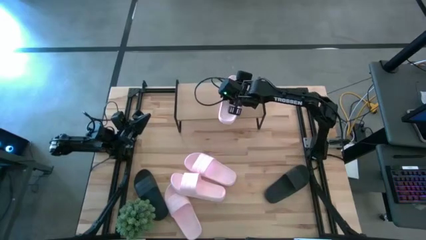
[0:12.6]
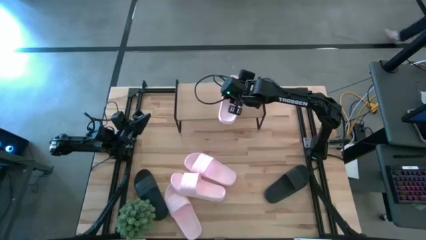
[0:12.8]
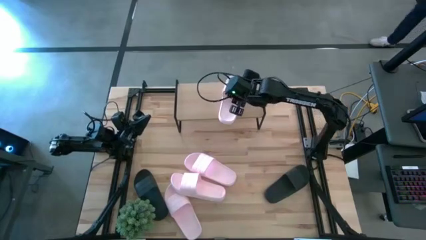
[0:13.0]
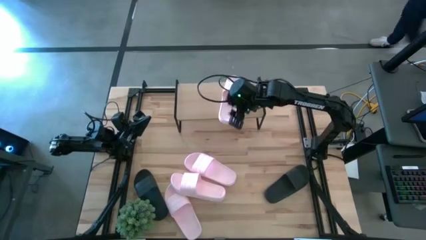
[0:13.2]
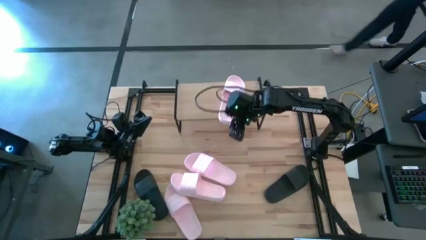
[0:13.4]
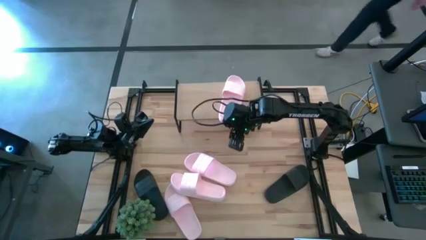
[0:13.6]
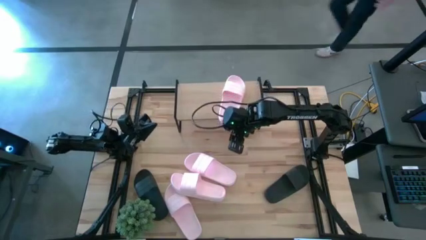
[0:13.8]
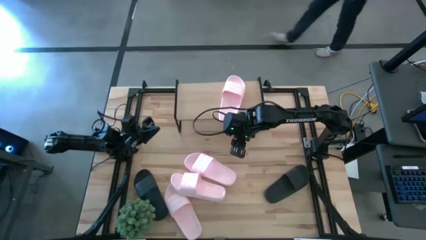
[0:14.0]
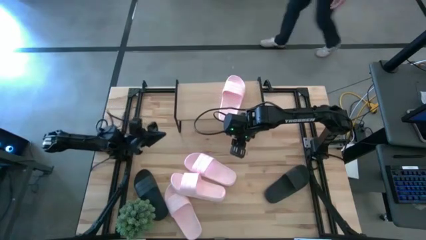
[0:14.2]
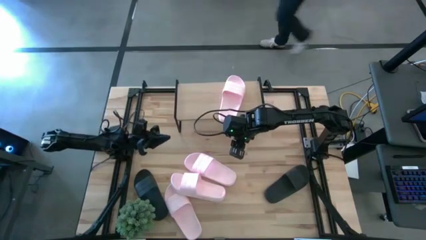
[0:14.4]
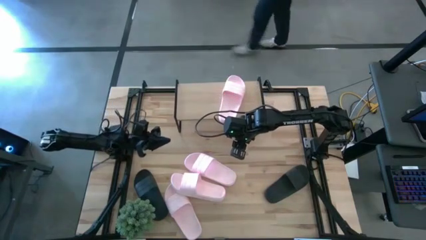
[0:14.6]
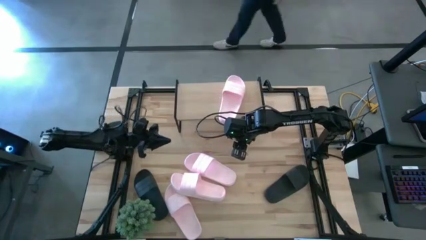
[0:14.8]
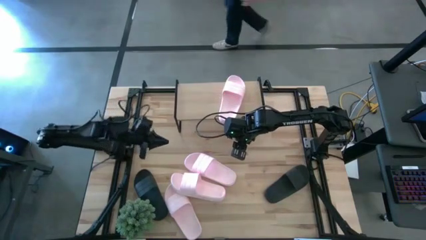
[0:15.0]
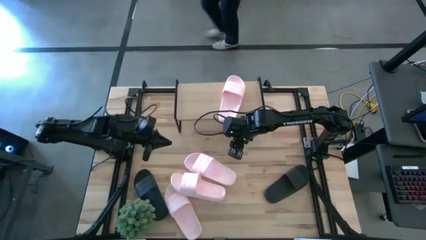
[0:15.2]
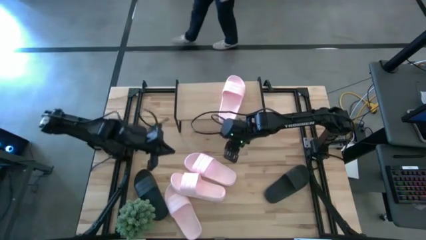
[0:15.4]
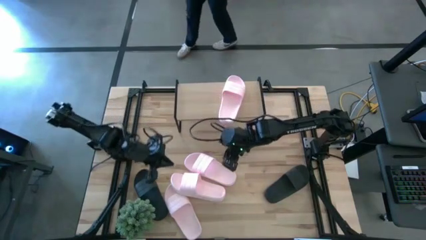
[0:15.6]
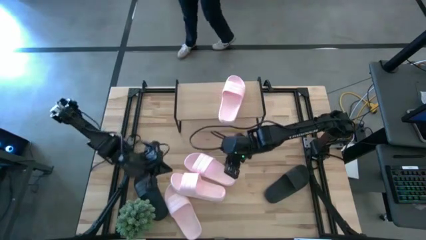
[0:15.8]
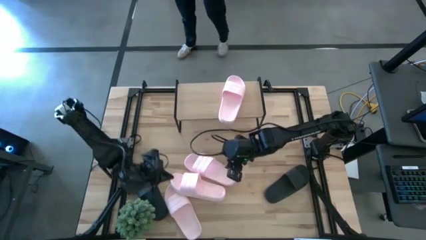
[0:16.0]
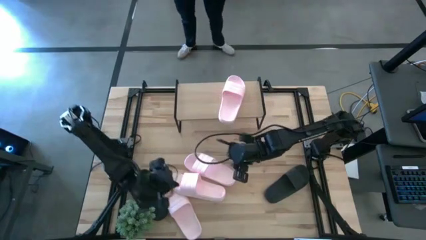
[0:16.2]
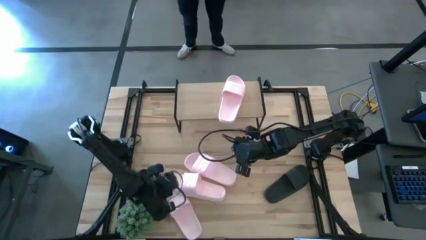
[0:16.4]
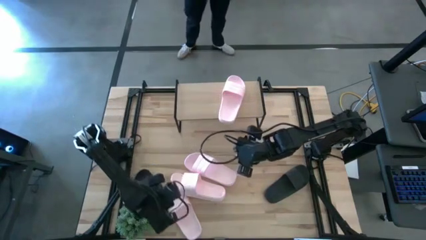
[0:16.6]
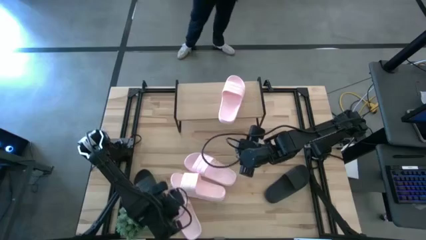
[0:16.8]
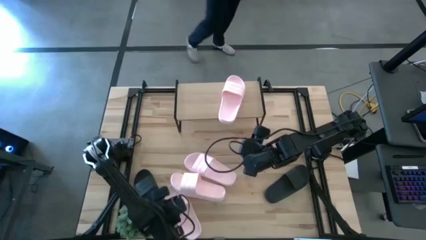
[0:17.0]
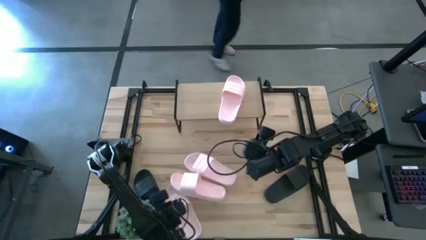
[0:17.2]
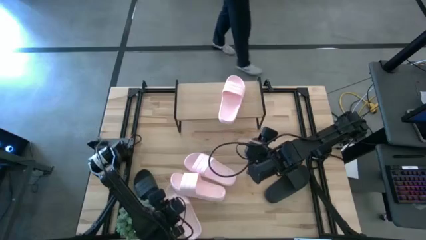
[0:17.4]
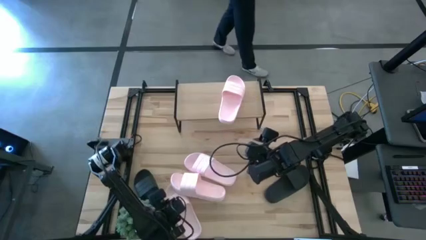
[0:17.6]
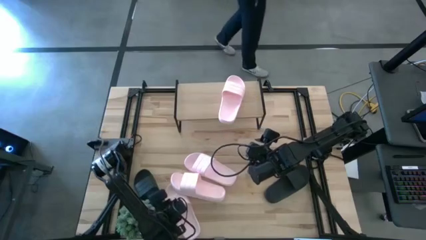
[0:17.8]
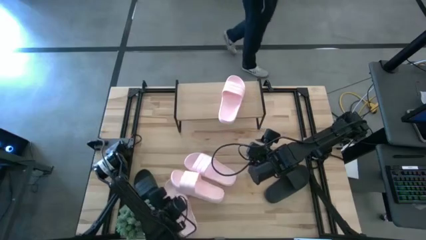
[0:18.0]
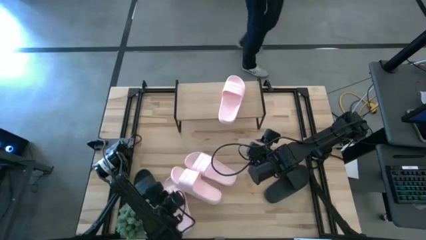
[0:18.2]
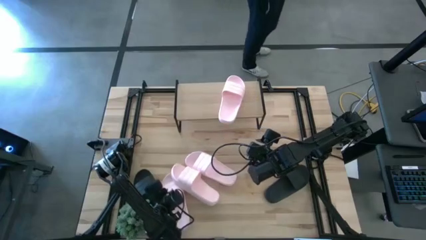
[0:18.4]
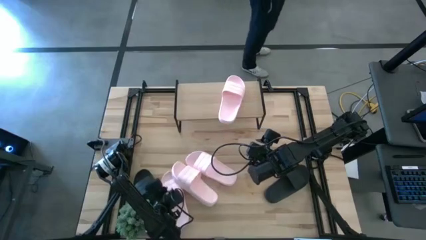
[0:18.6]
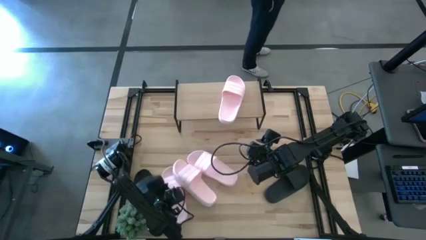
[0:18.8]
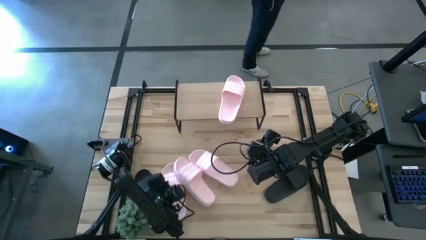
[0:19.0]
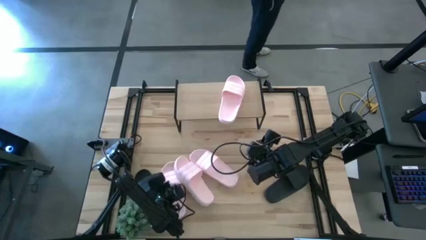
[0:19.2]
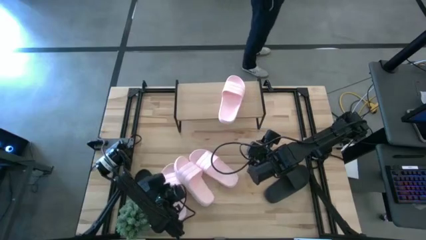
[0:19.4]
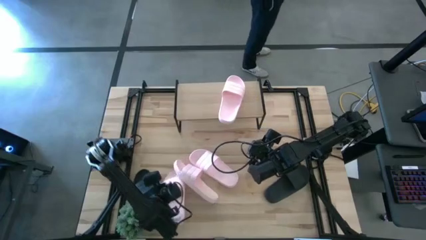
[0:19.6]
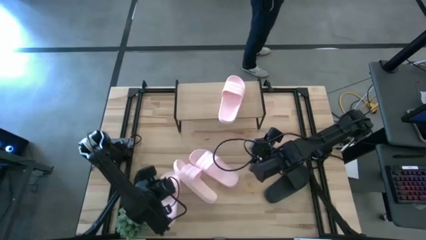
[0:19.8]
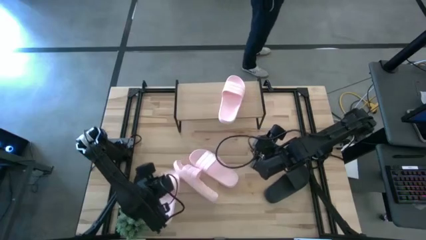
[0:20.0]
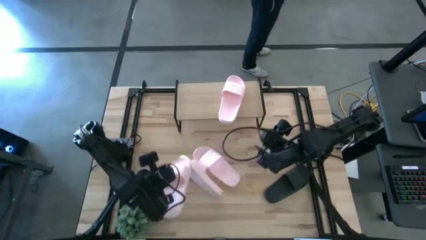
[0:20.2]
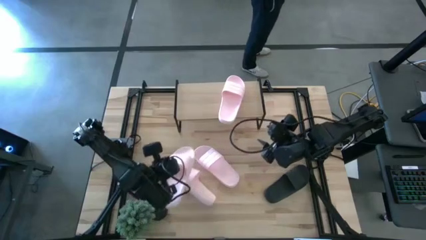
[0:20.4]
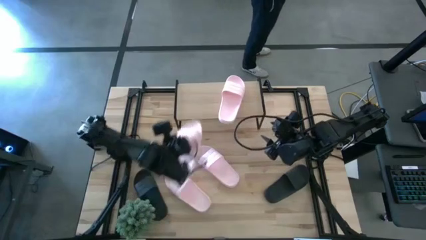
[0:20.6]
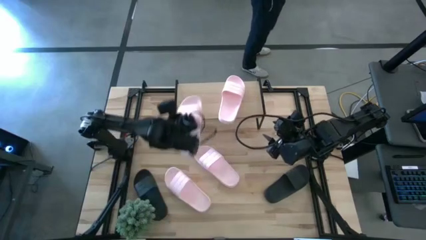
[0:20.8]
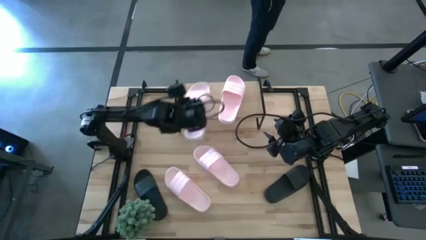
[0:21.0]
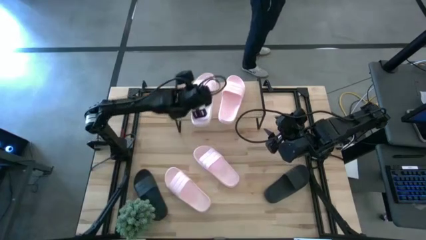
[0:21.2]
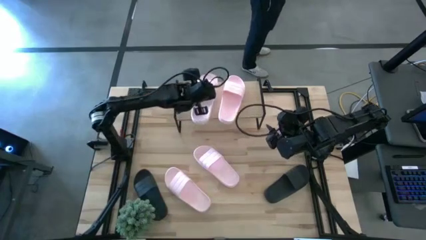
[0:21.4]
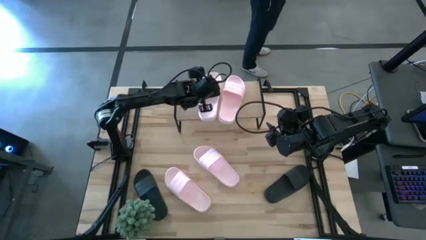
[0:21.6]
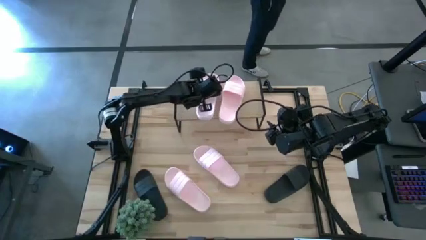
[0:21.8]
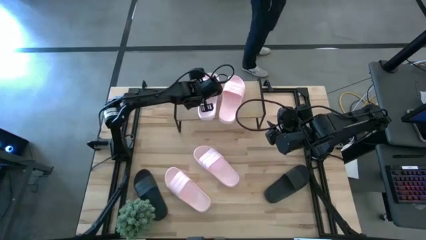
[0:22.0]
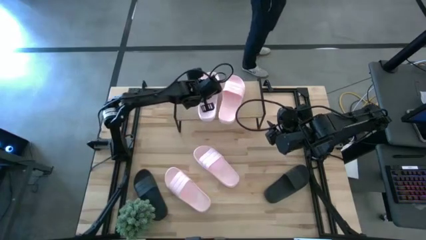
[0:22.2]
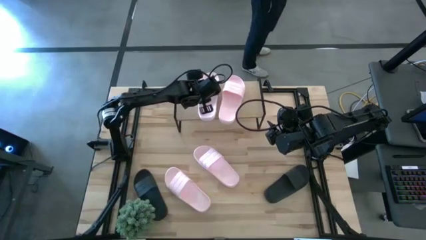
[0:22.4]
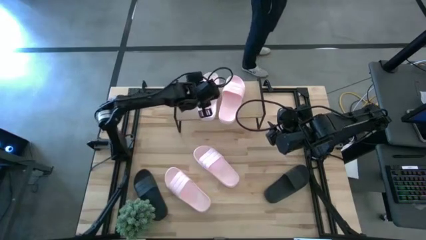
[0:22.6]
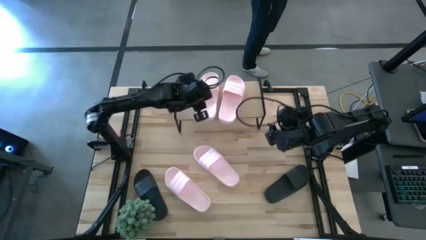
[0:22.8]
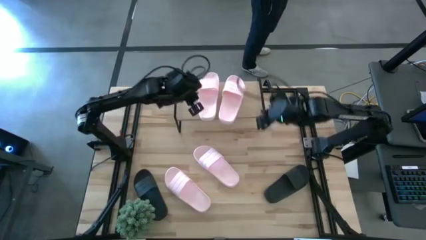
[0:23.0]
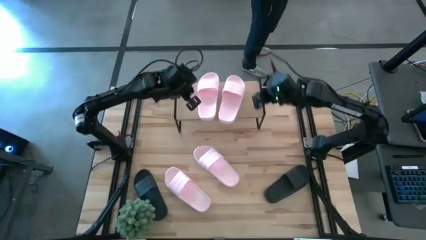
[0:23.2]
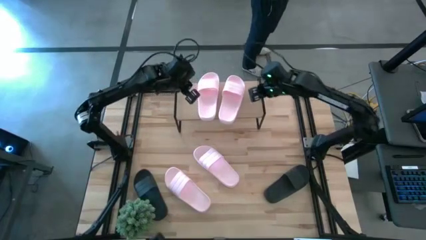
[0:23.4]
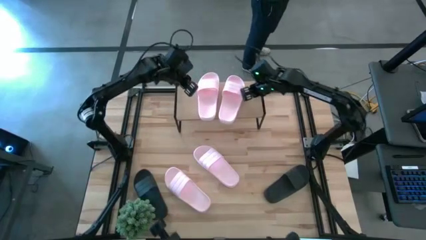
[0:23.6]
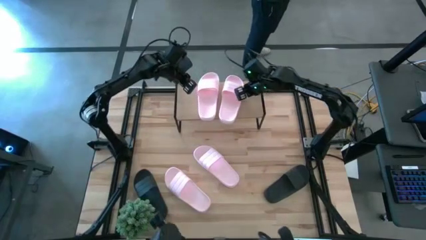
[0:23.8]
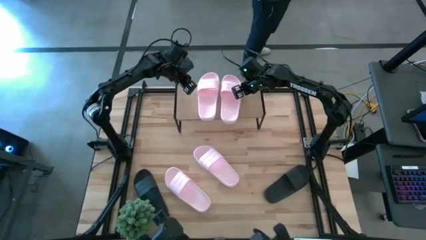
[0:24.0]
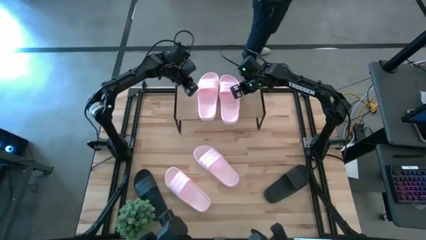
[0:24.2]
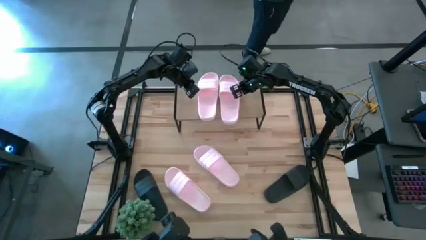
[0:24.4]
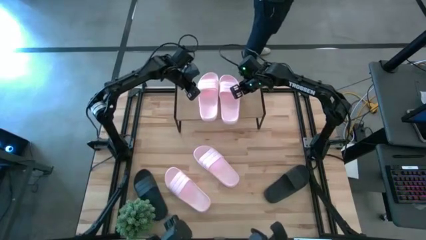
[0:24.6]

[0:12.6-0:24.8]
Task: Pick and place slides into the shelf
Put the pink sandal on the shelf

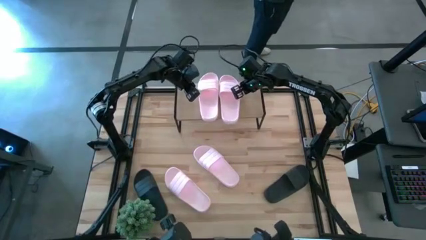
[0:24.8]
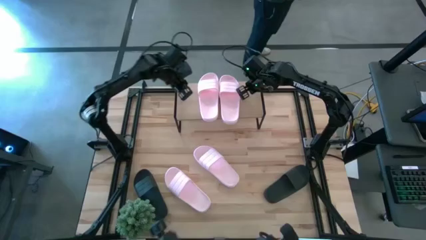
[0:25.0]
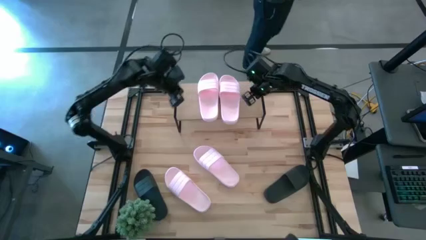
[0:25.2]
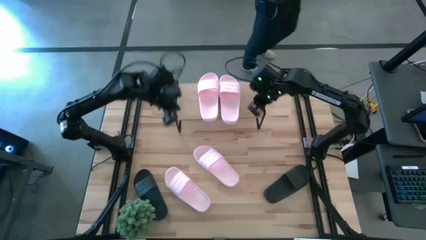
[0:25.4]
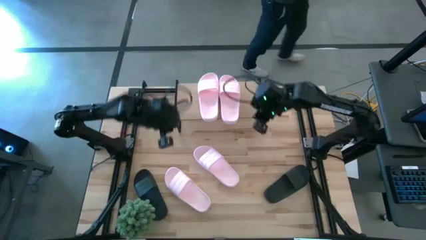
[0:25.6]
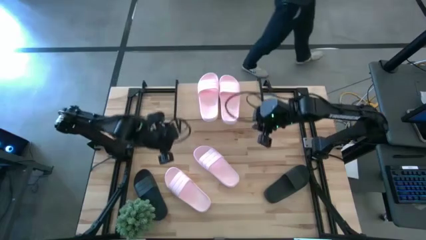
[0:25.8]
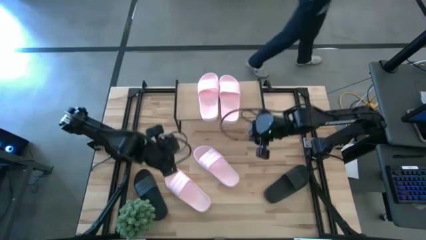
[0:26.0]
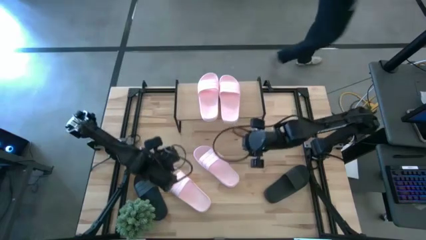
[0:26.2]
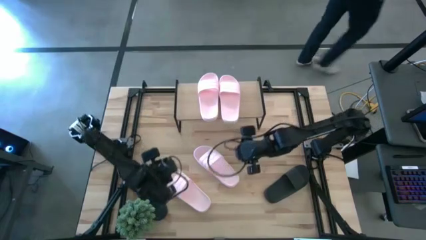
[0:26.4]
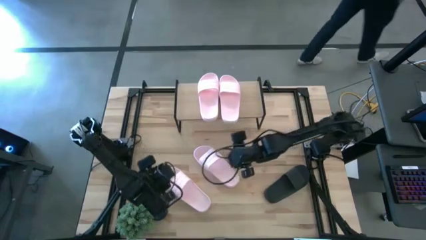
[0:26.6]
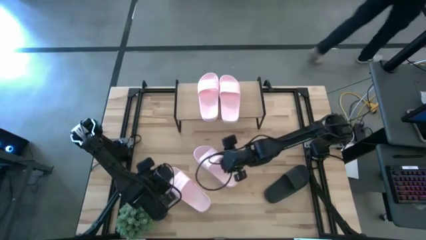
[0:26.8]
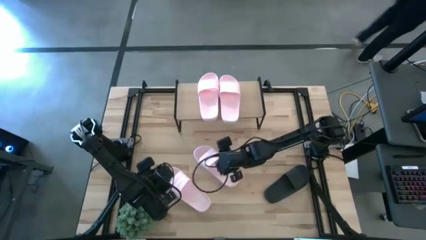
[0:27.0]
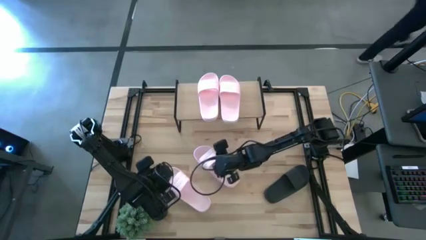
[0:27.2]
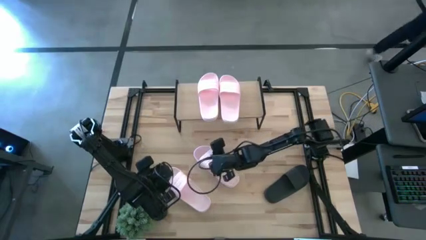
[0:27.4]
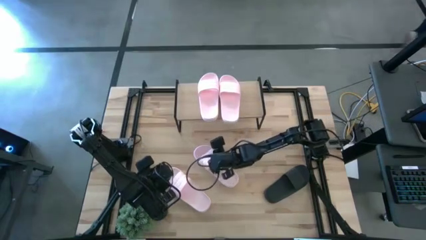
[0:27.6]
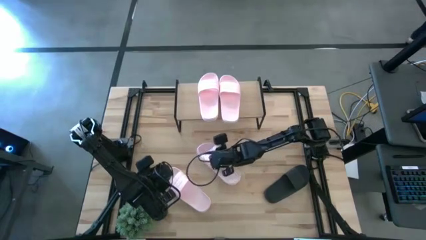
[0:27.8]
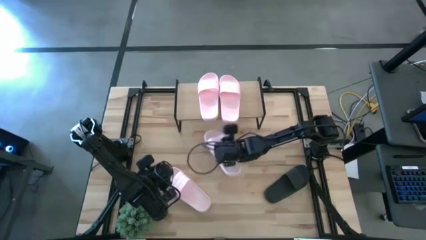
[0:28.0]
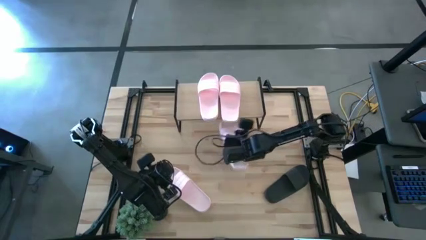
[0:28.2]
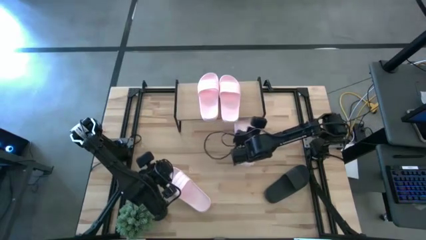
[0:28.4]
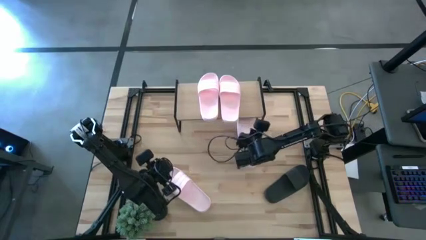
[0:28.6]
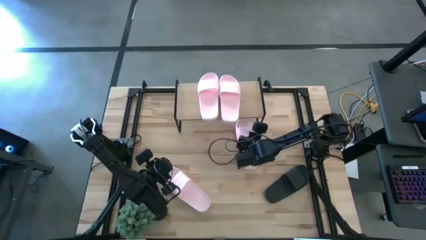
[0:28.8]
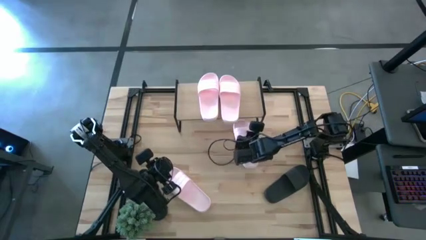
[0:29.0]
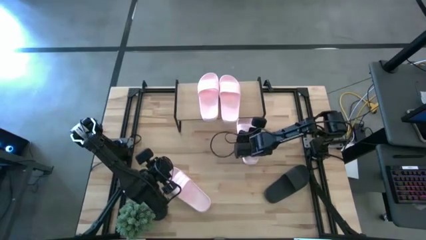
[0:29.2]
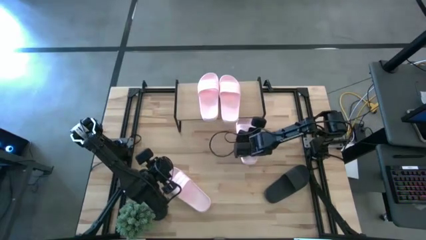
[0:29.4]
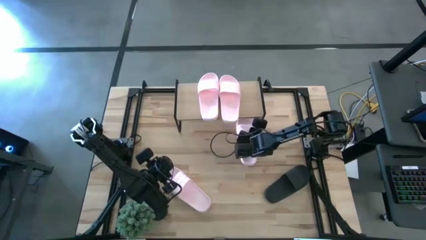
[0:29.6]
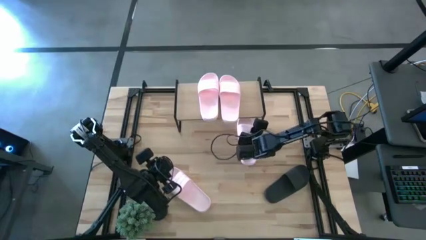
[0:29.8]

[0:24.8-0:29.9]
Put the pink sandal under the shelf
